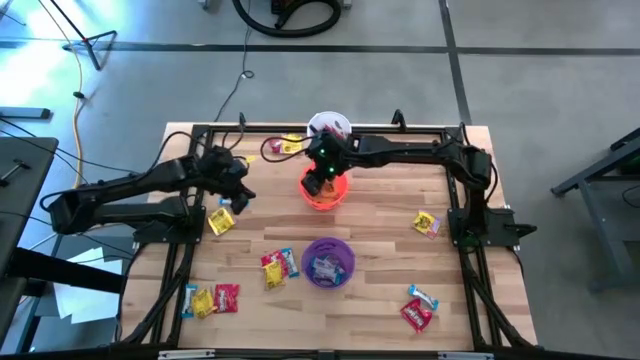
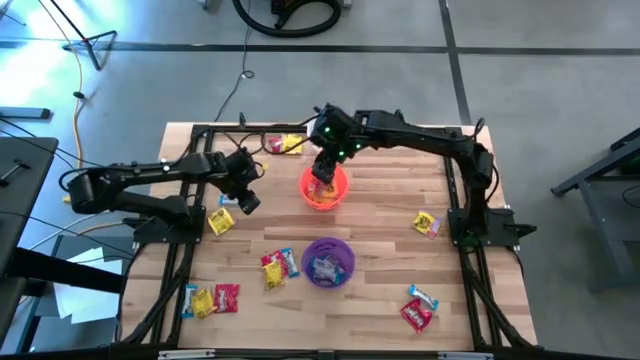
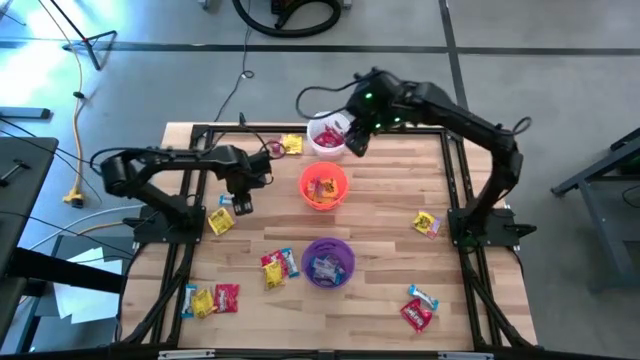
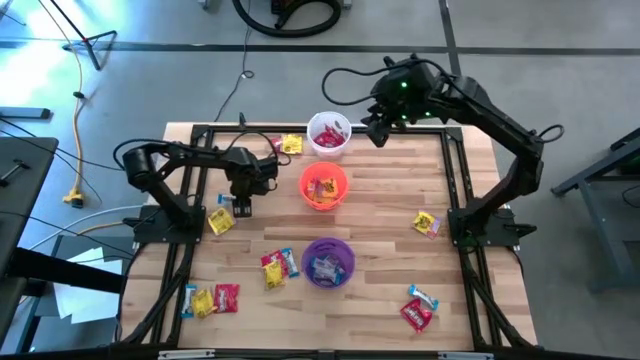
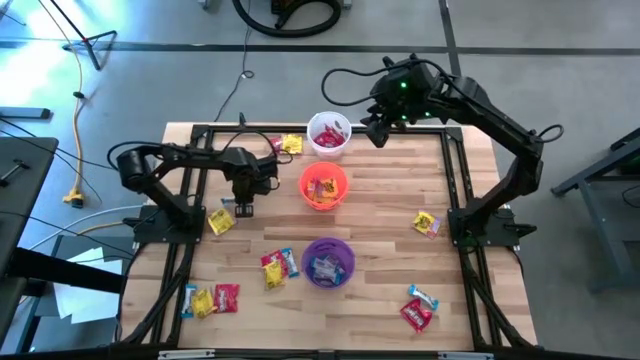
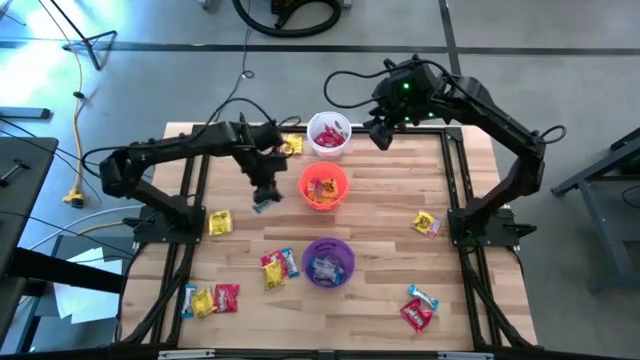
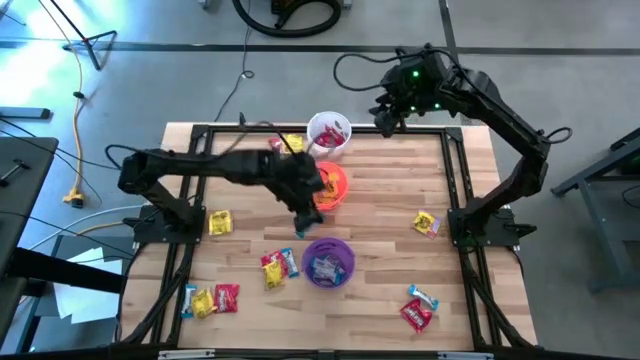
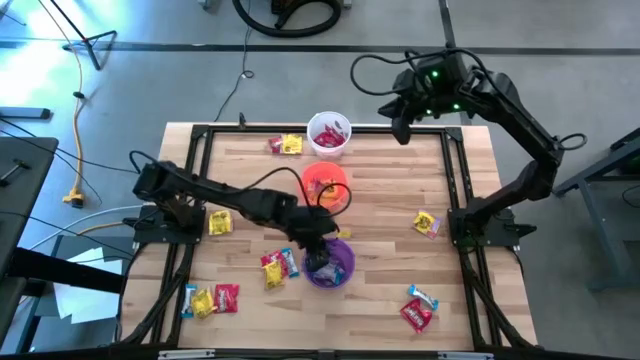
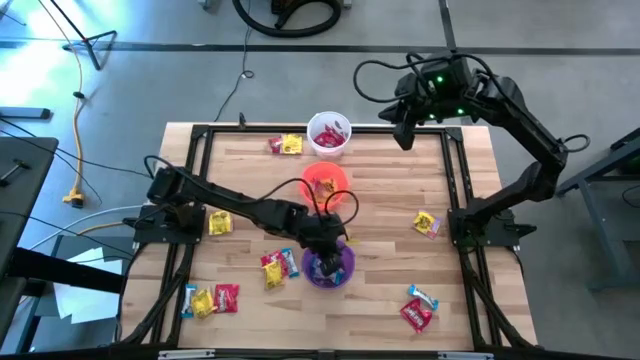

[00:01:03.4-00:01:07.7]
Task: Sort candy
Put the white chocolate into the violet bucket

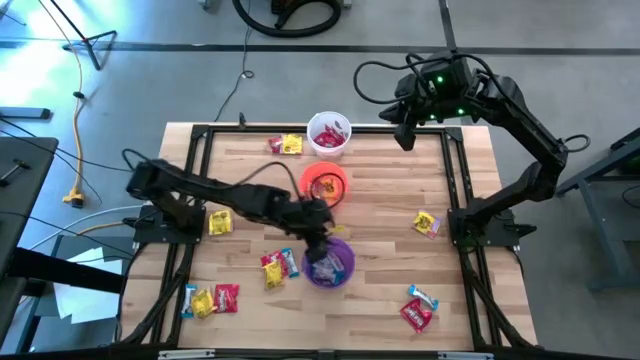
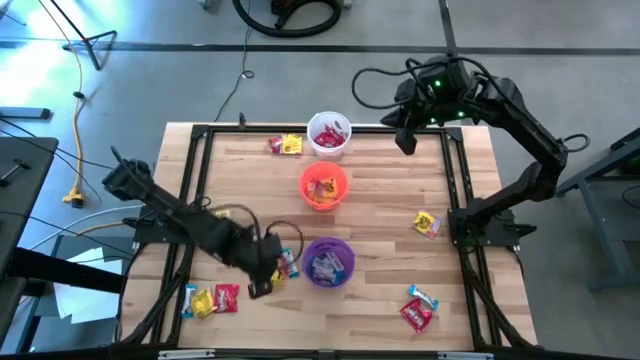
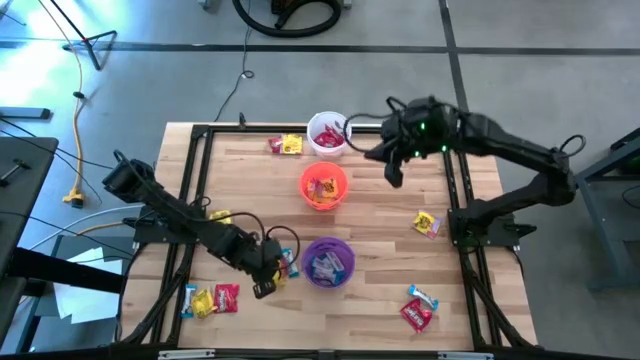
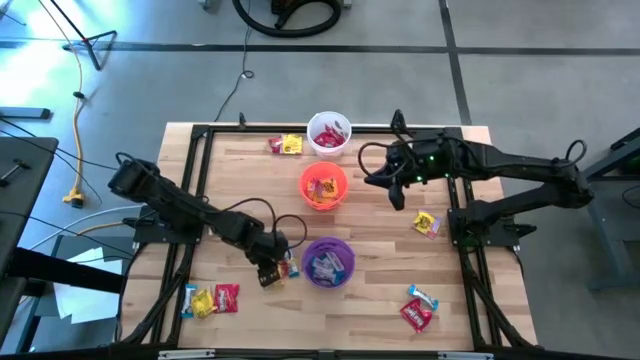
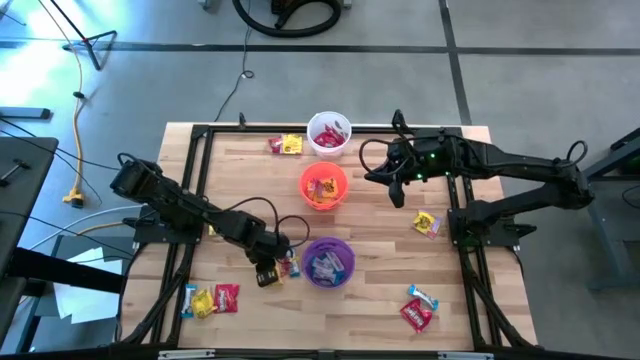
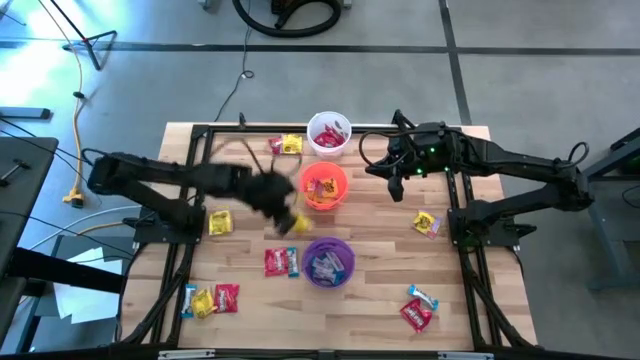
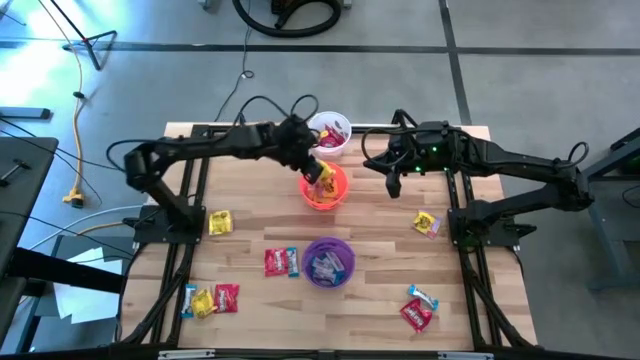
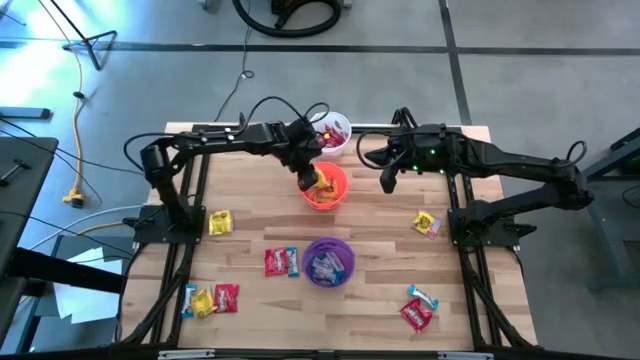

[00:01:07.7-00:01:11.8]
Put the yellow candy into the orange bucket

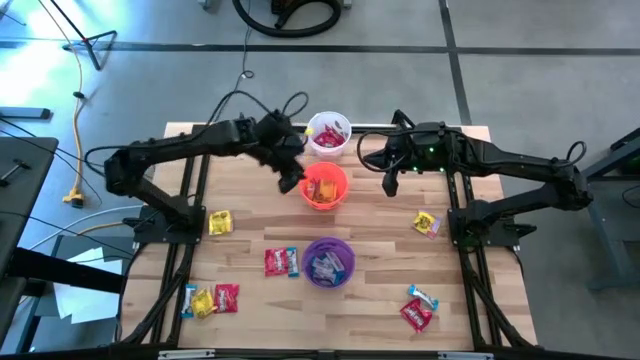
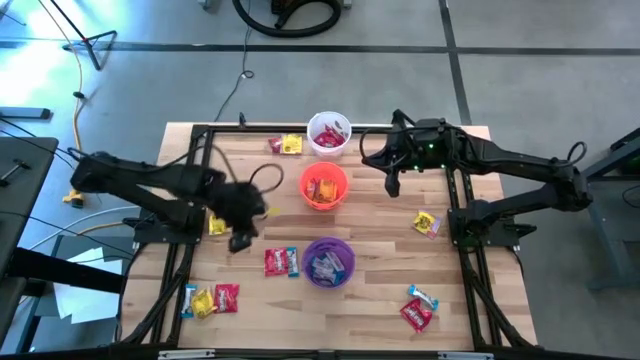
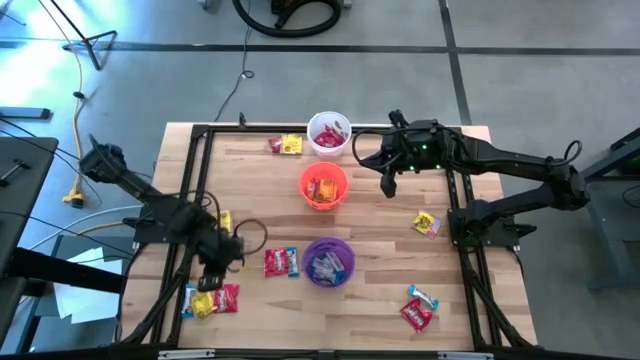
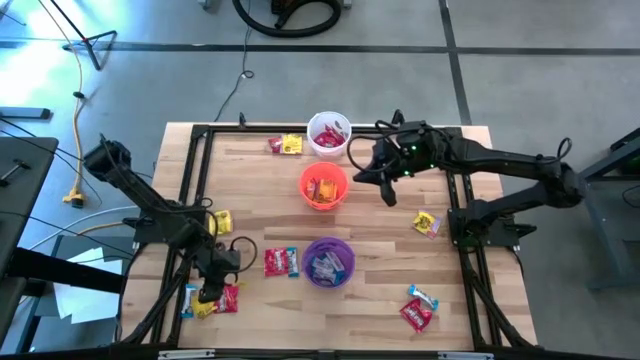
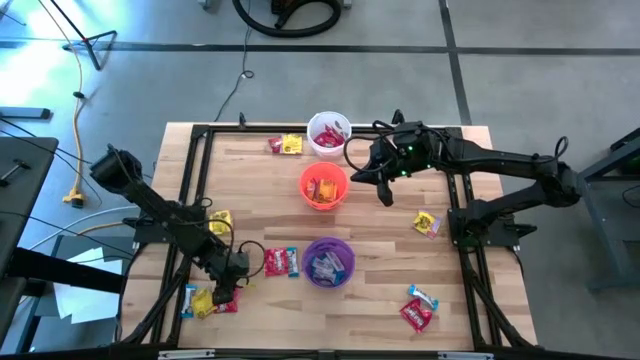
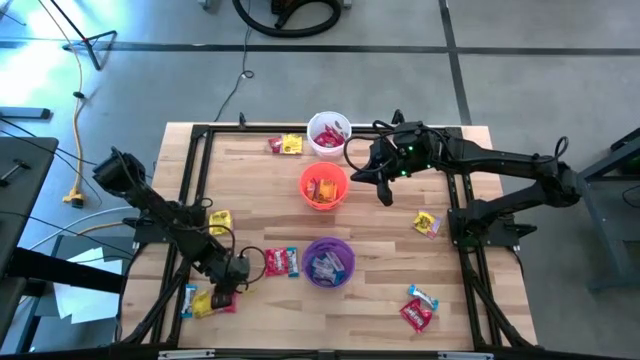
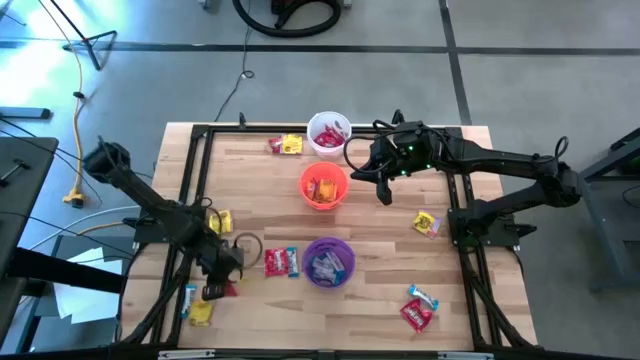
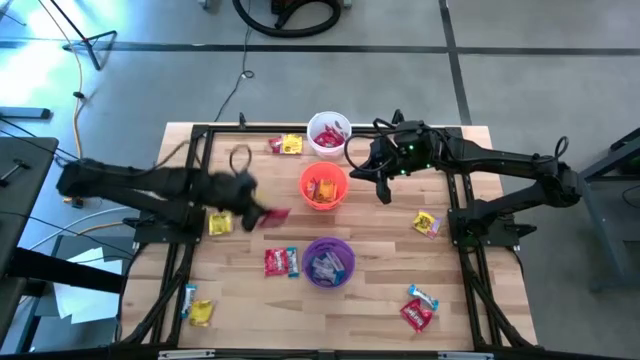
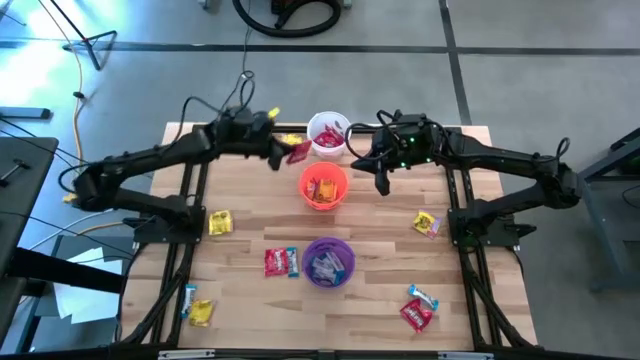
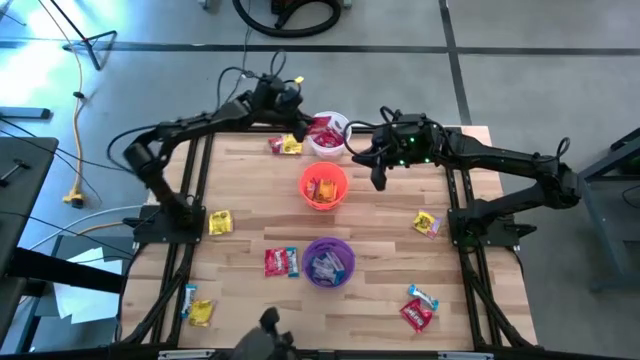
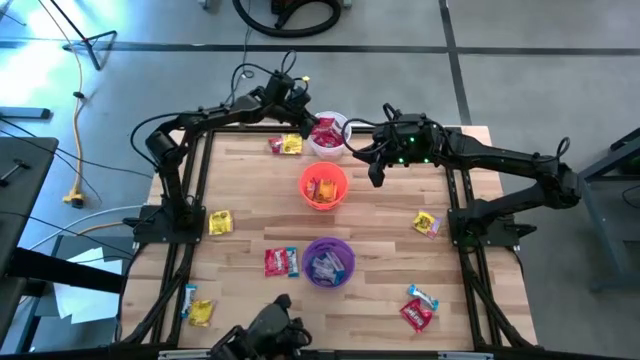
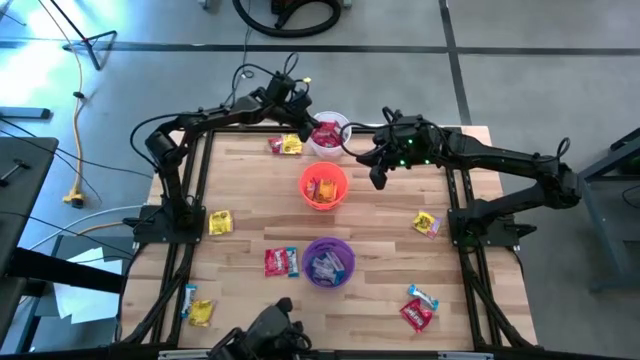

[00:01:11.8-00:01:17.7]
Put the red candy into the white bucket

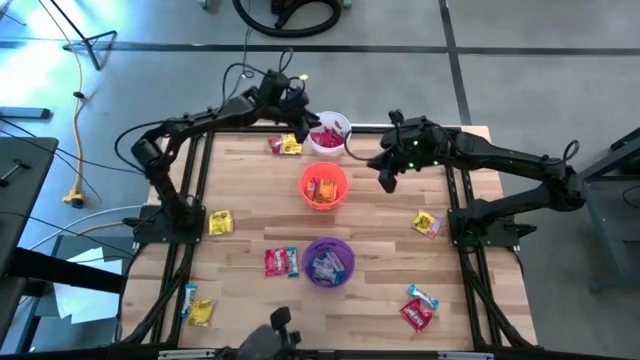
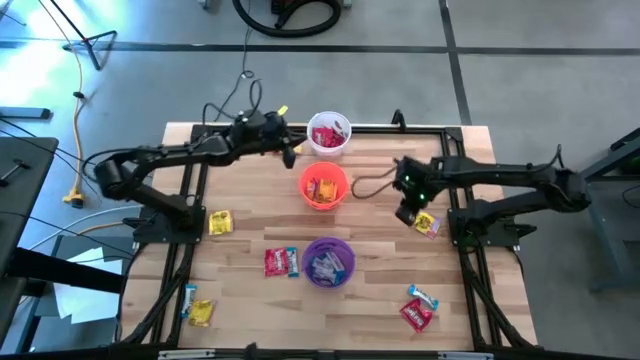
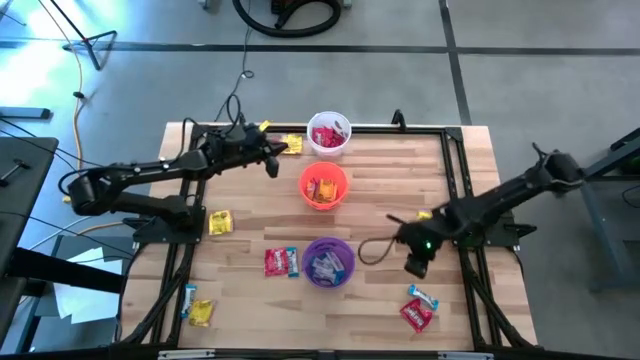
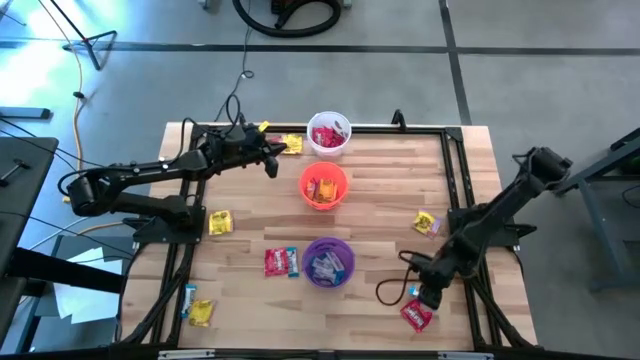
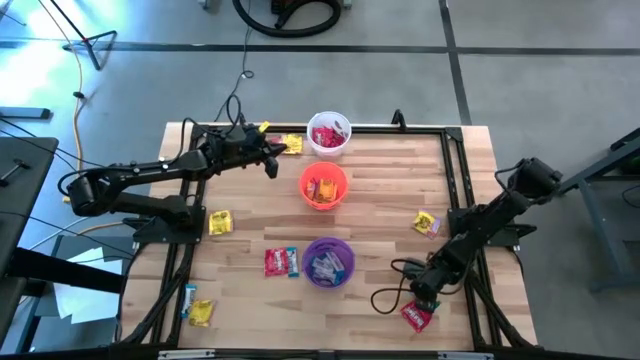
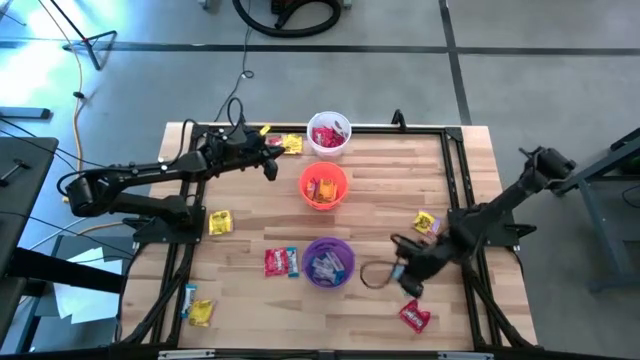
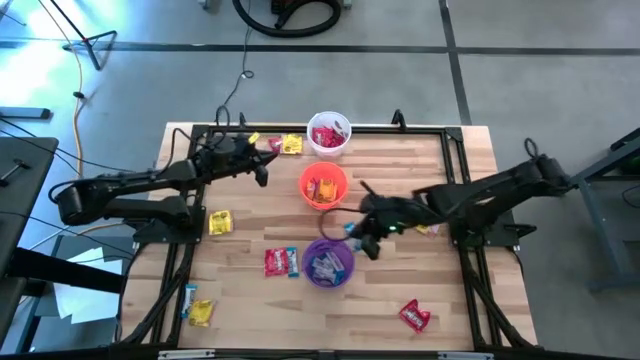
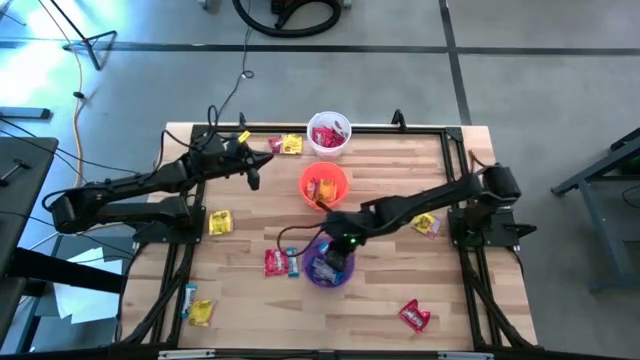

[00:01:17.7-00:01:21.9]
Put the white chocolate into the violet bucket

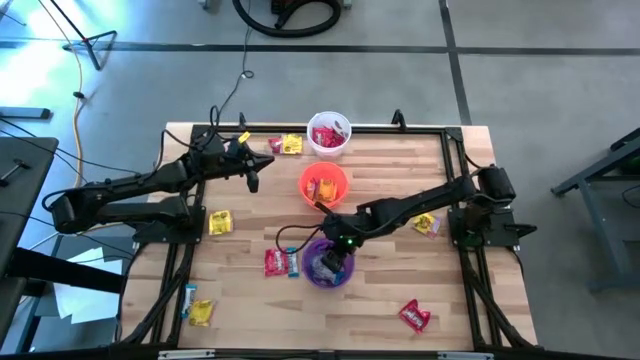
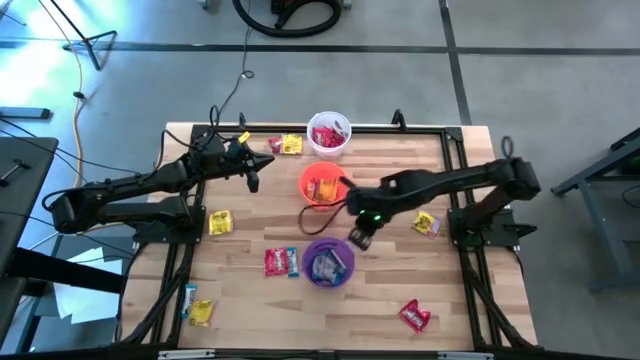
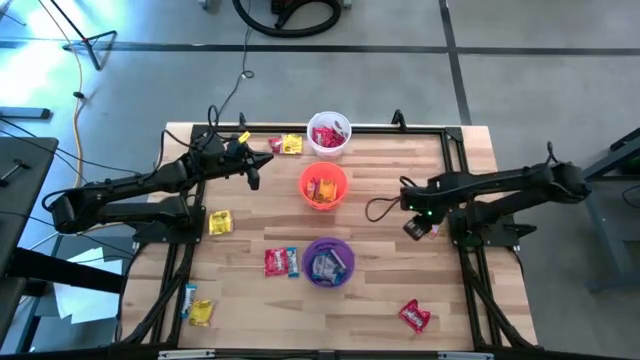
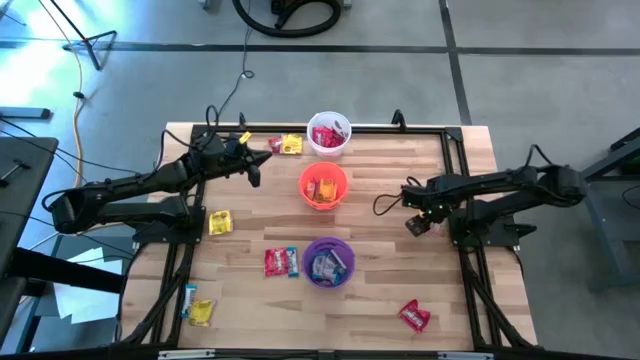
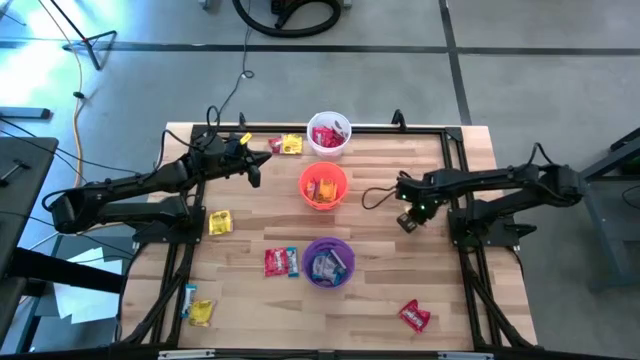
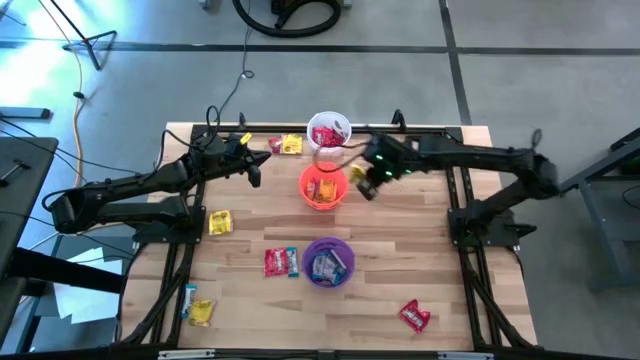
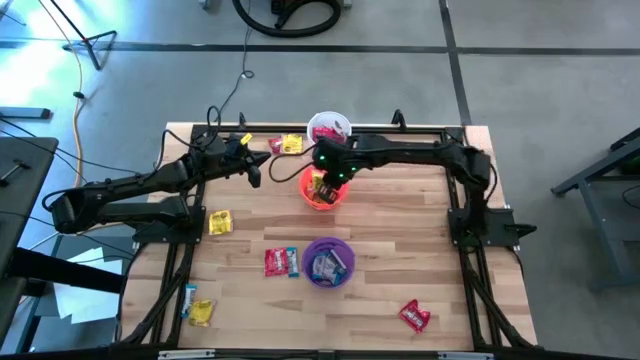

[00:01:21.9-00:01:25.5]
Put the yellow candy into the orange bucket
